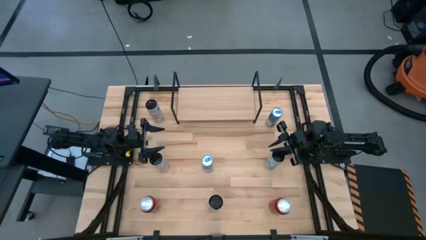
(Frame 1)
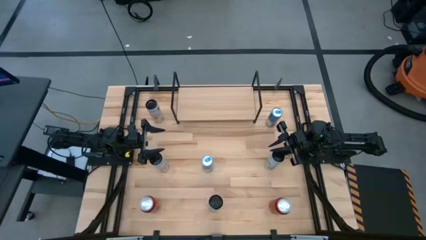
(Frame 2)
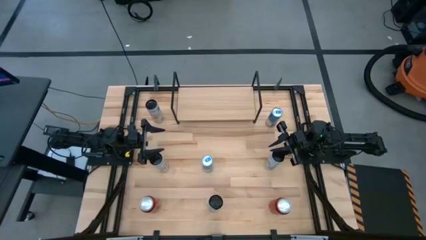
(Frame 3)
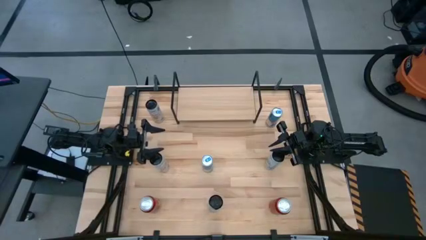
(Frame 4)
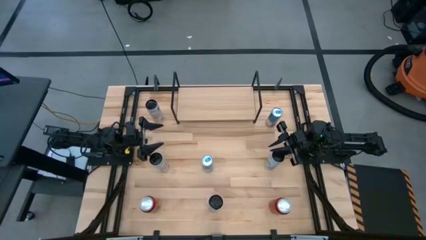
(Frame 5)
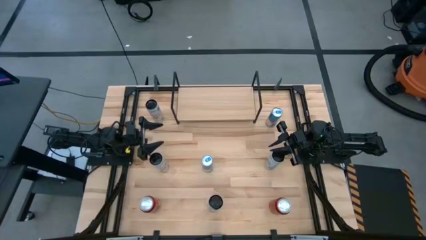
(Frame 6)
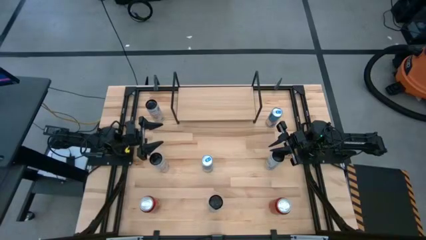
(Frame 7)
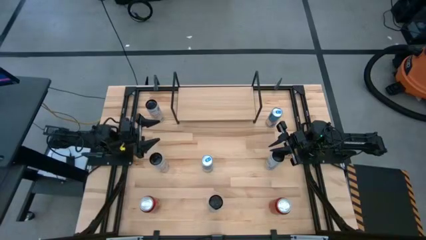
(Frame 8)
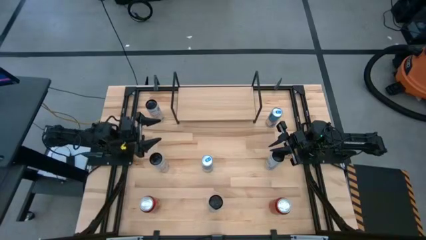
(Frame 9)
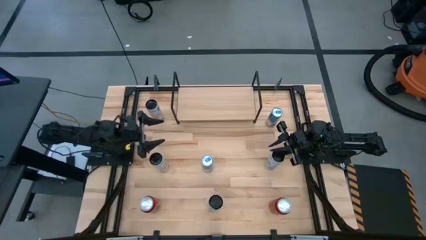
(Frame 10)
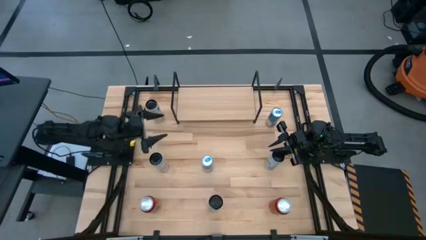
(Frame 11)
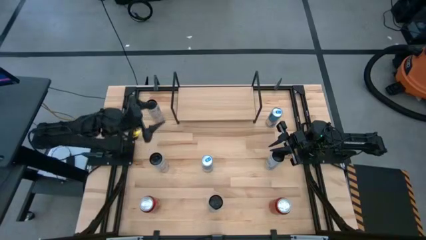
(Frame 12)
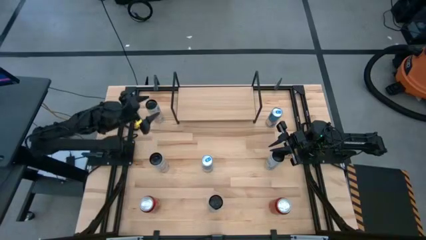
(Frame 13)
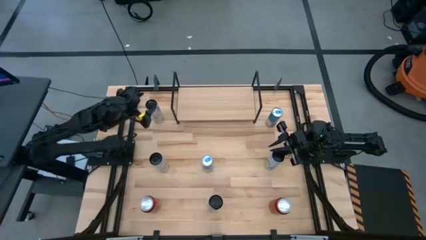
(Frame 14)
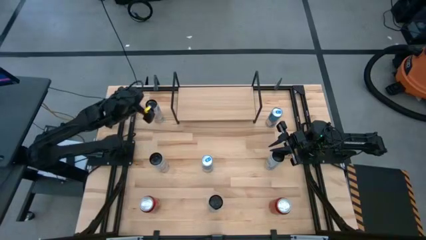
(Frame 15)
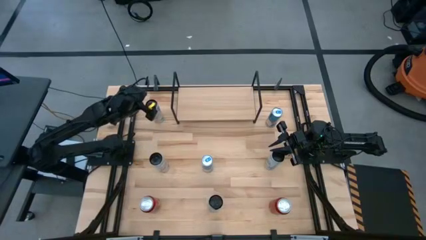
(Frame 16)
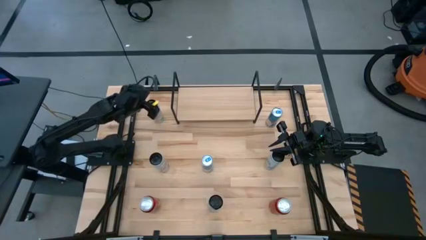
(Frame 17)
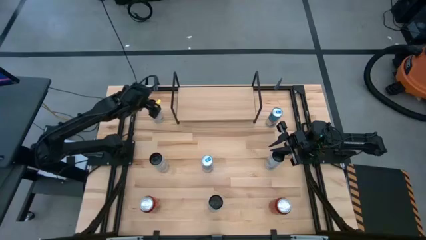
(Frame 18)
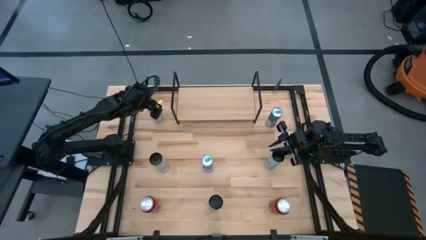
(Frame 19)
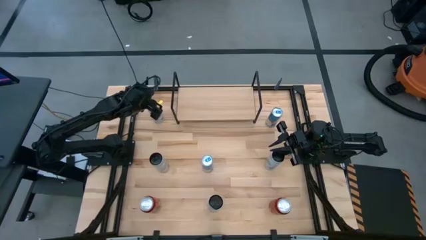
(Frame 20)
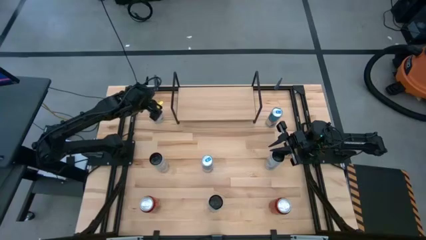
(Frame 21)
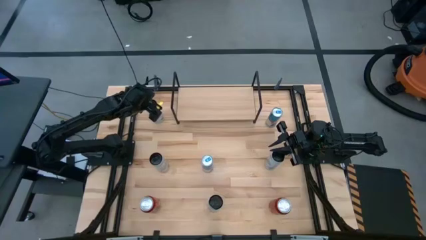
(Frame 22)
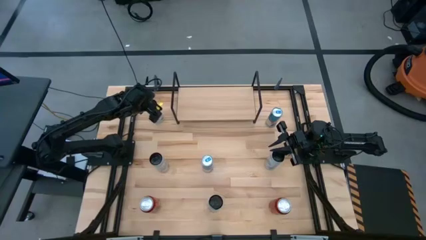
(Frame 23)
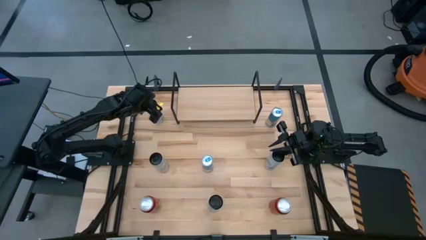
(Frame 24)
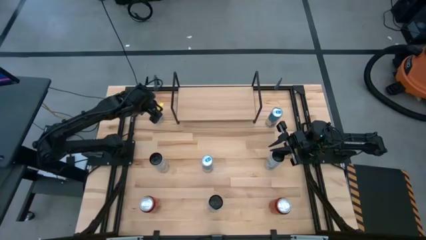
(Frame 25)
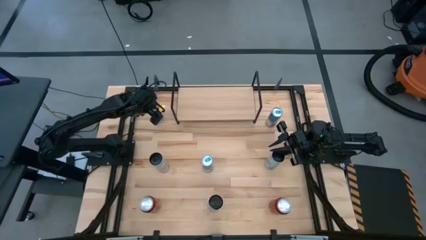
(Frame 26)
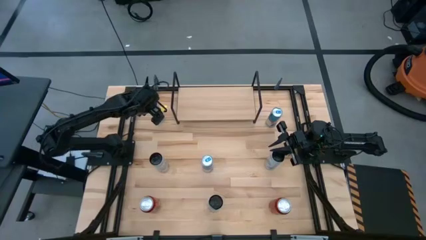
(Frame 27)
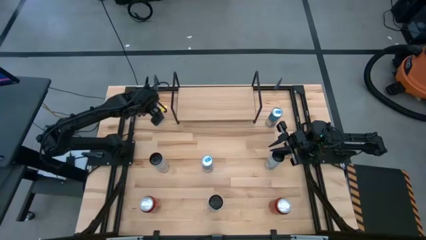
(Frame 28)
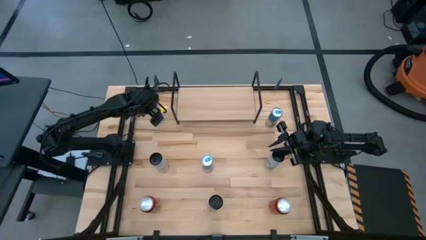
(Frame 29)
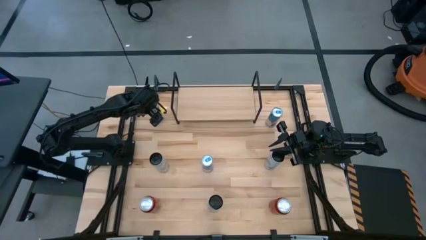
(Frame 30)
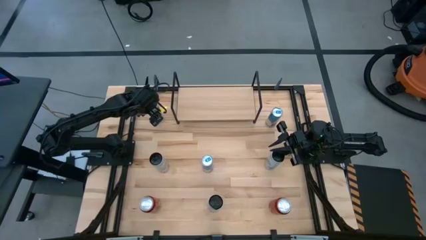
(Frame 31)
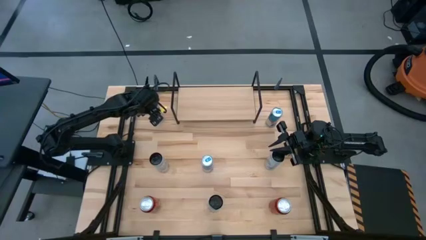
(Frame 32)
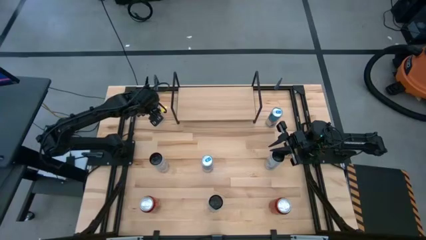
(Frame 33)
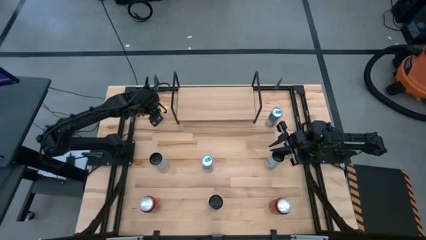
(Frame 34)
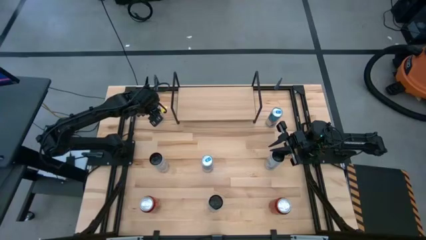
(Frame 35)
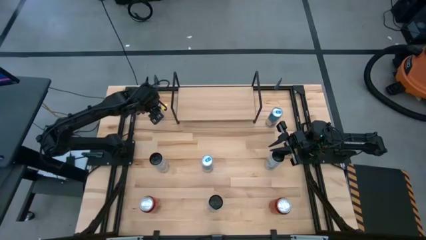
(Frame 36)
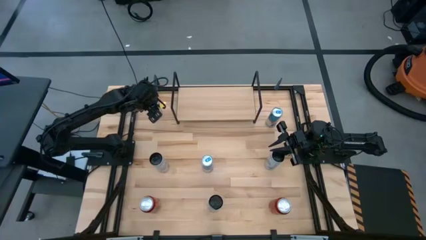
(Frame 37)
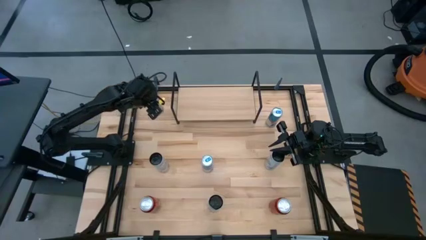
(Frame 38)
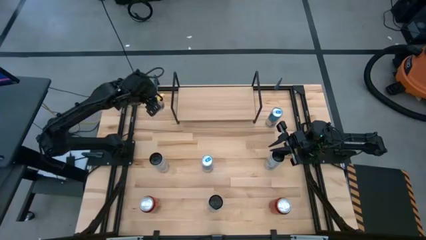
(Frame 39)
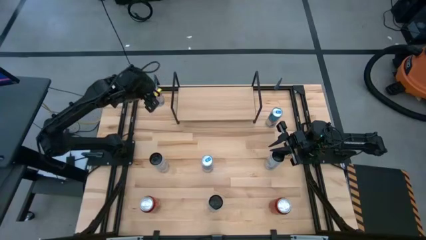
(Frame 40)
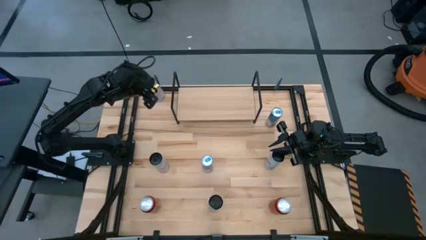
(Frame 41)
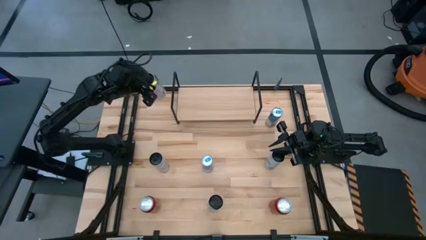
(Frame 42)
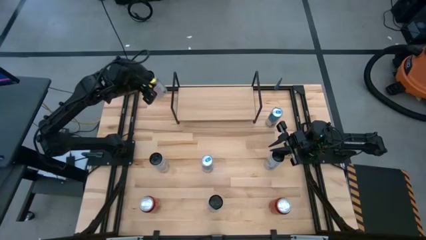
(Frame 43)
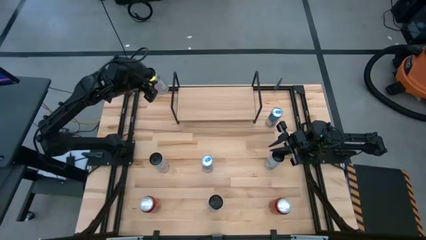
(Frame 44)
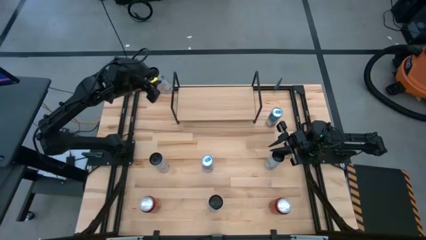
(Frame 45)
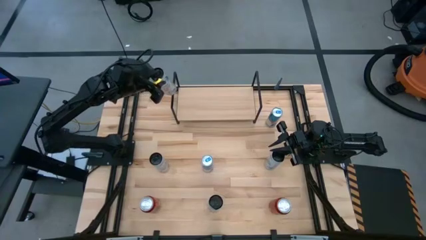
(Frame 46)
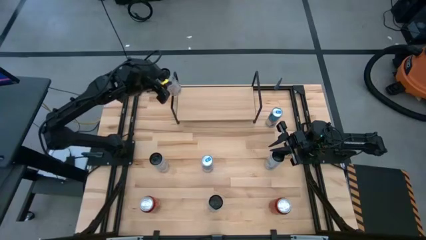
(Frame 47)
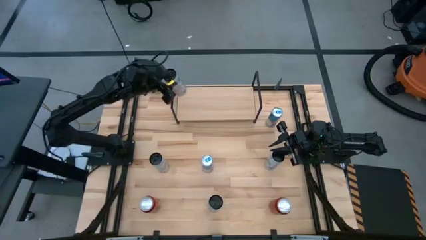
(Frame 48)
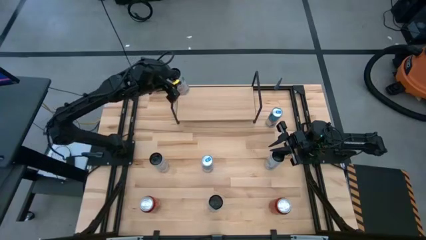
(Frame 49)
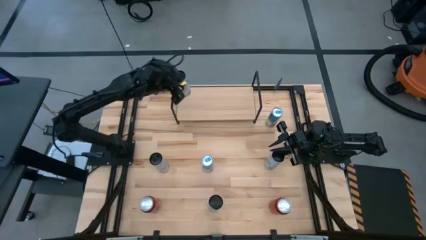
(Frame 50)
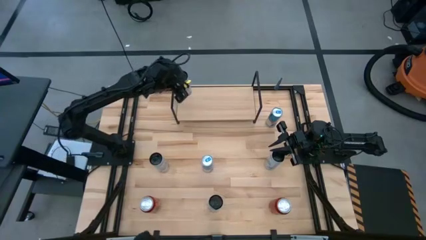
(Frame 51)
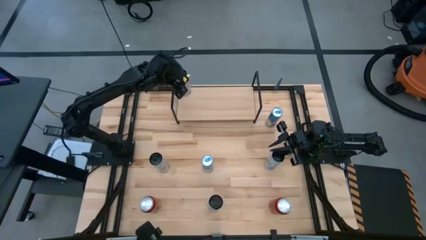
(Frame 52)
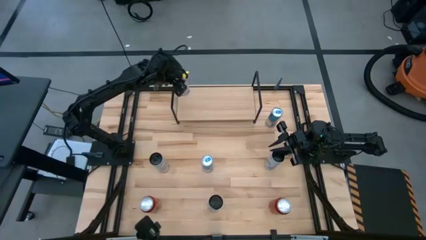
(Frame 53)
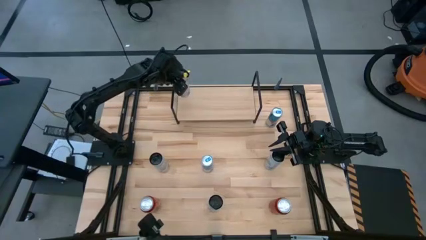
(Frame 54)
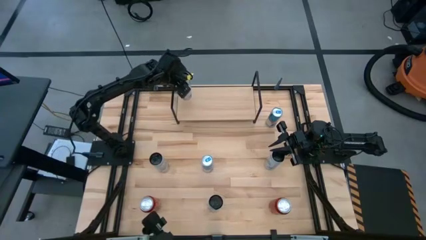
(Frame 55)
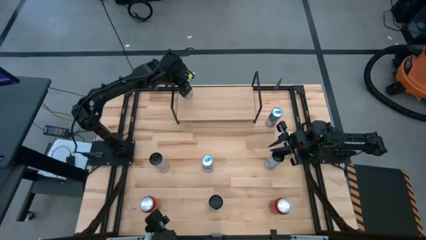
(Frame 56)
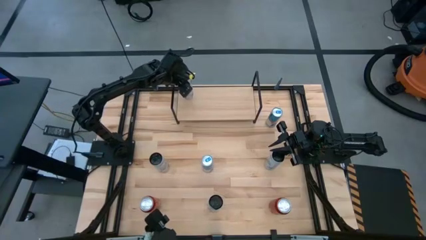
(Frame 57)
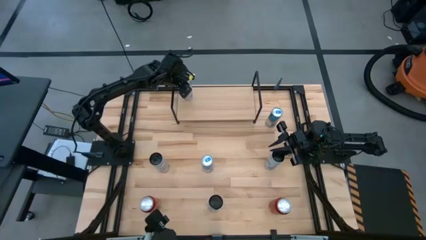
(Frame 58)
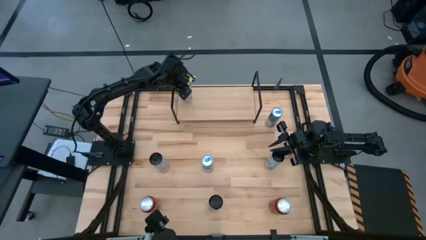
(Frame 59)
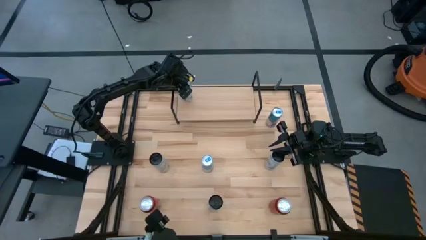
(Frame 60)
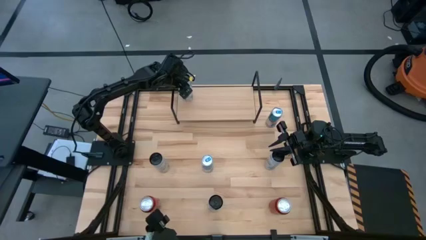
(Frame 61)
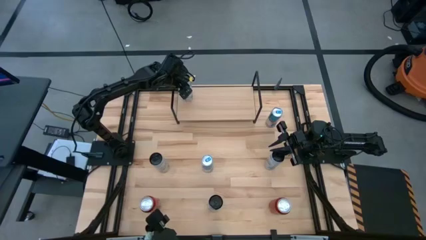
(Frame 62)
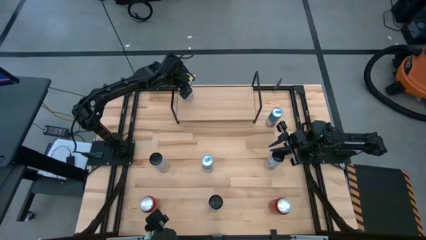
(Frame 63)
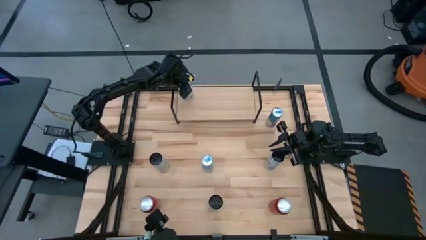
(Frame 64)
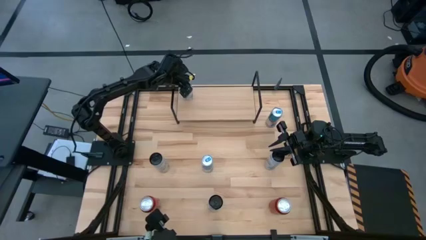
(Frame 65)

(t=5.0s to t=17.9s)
Task: Place canned beverage on shelf
Put the top white pink soda can on the shelf

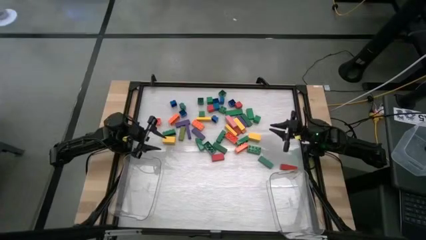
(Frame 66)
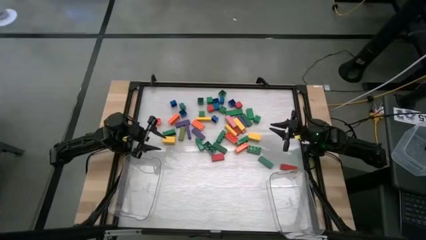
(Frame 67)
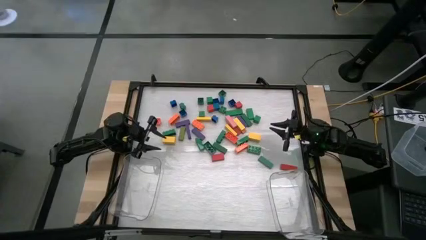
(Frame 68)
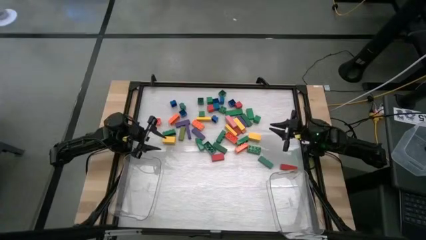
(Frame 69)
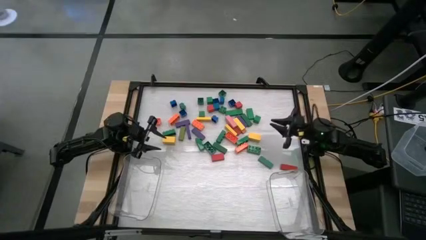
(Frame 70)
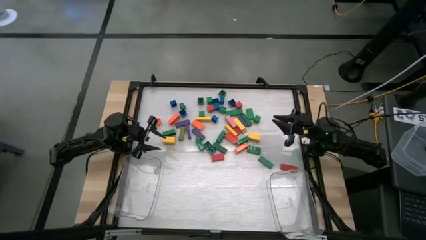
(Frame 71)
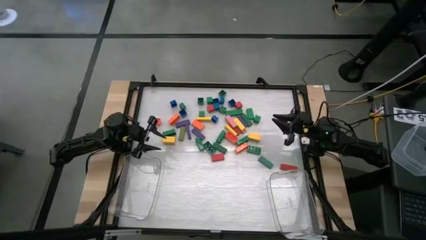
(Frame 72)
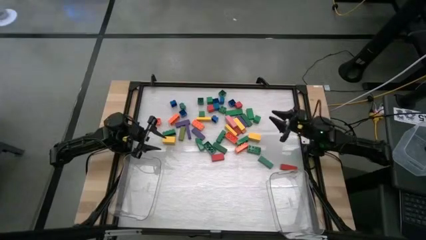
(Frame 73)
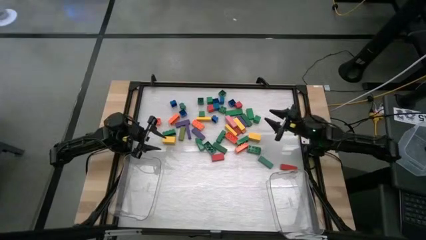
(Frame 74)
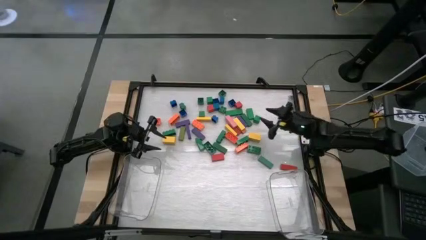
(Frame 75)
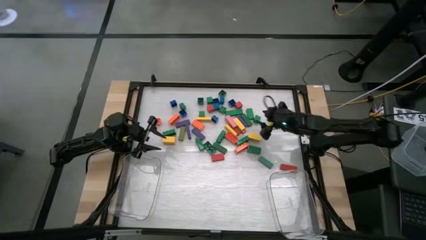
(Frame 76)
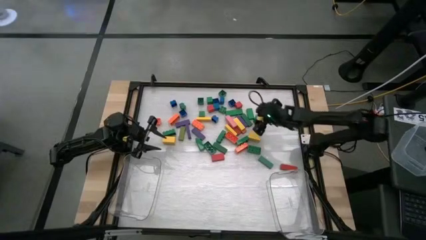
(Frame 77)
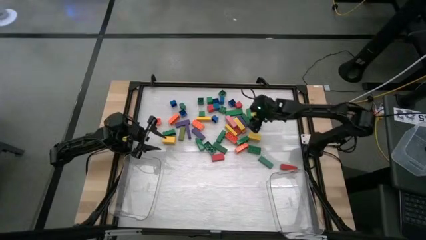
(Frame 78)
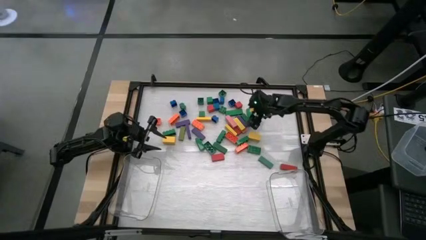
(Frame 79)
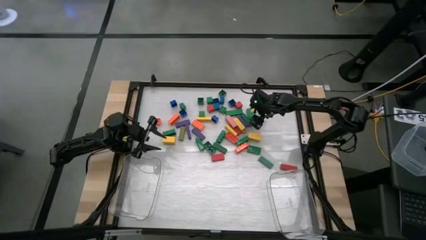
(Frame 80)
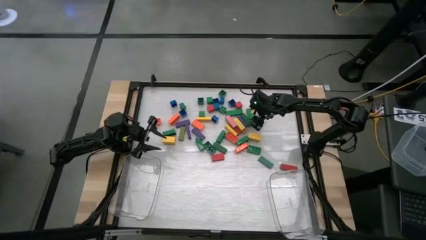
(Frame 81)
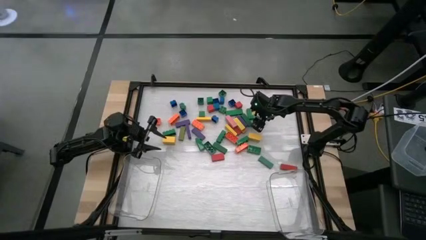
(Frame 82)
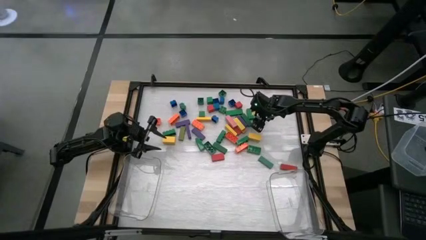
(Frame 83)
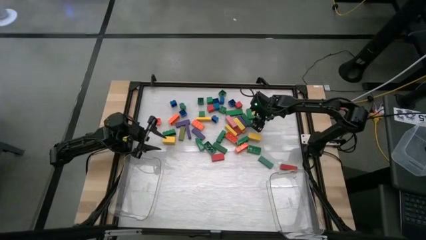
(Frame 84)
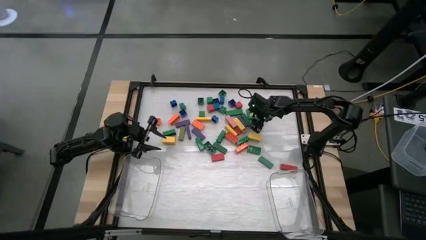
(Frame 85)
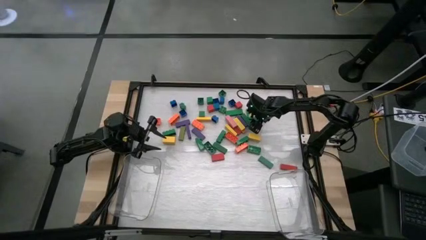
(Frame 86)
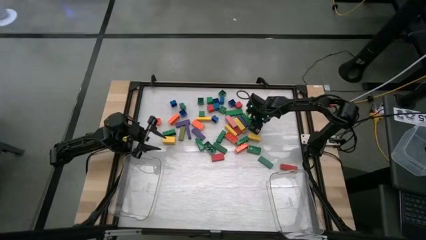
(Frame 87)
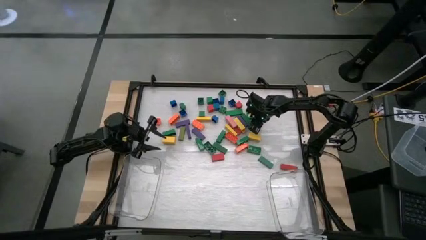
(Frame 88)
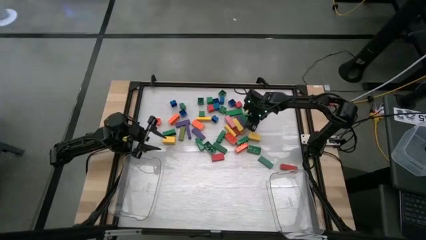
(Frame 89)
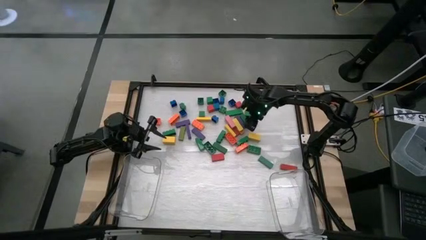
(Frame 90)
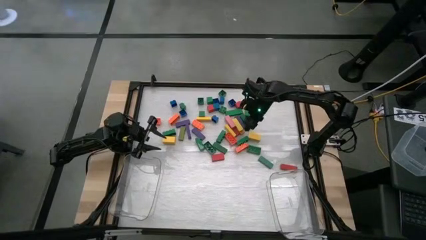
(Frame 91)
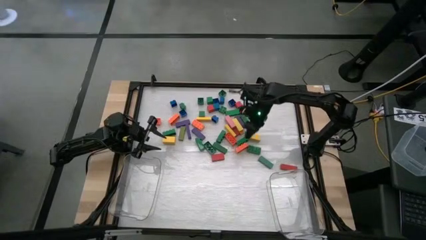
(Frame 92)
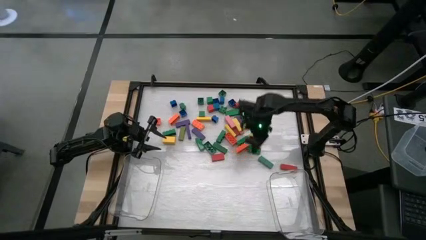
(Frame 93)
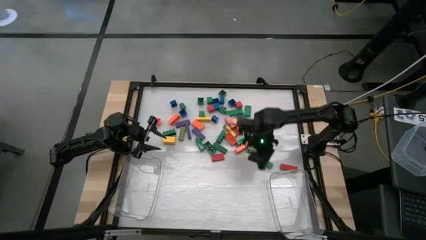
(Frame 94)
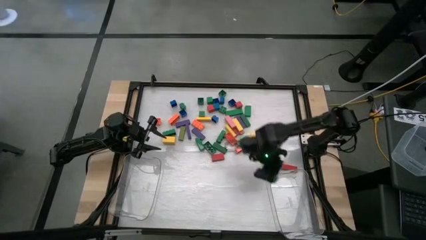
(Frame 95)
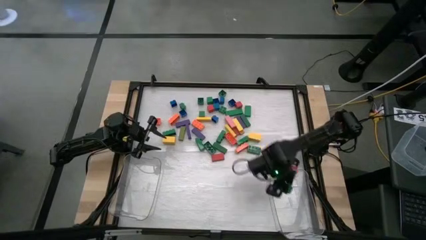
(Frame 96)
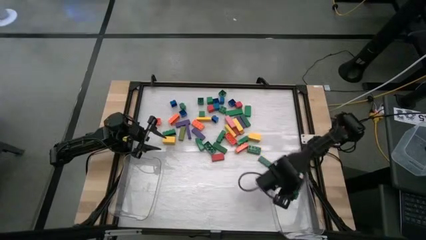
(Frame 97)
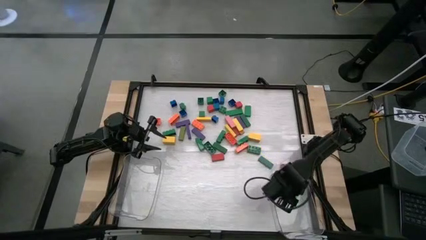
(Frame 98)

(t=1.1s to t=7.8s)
Task: Sort blocks by size
Put the small green wooden block into the right transparent bin
